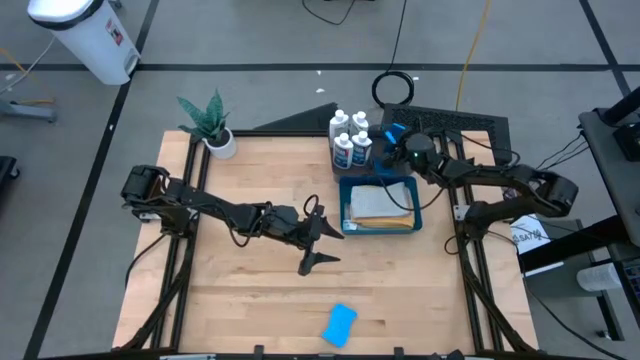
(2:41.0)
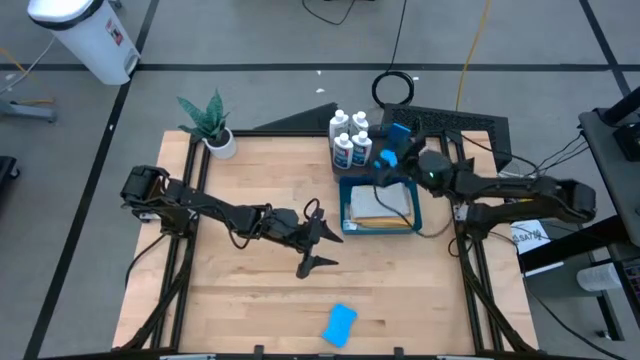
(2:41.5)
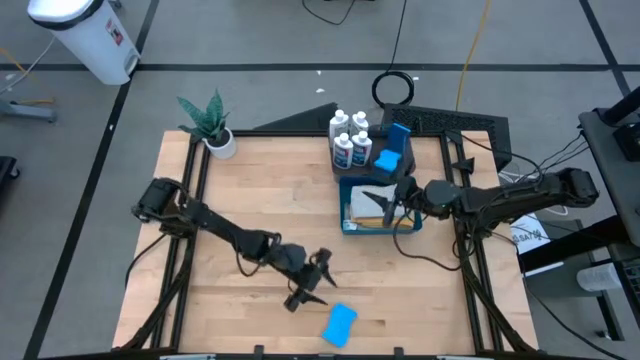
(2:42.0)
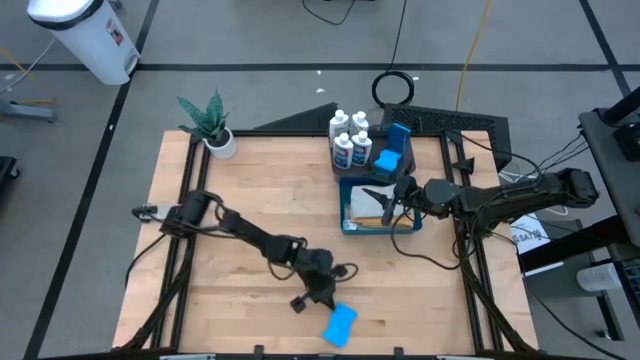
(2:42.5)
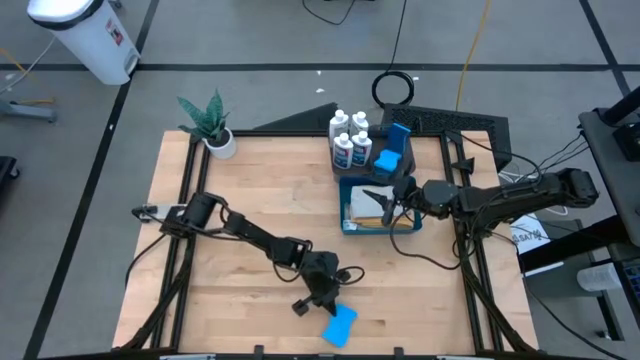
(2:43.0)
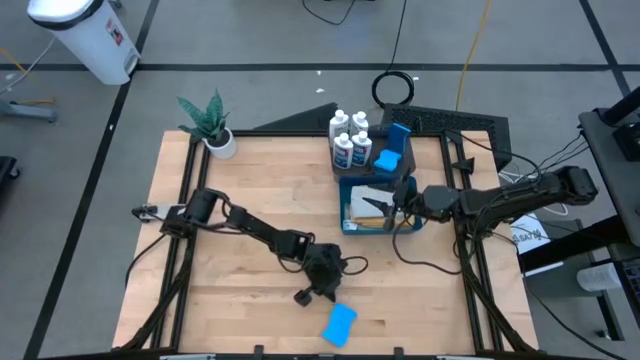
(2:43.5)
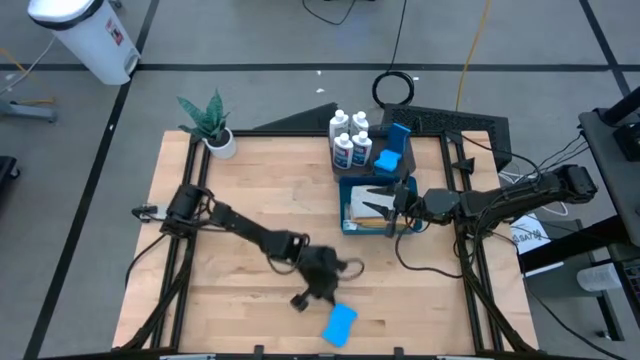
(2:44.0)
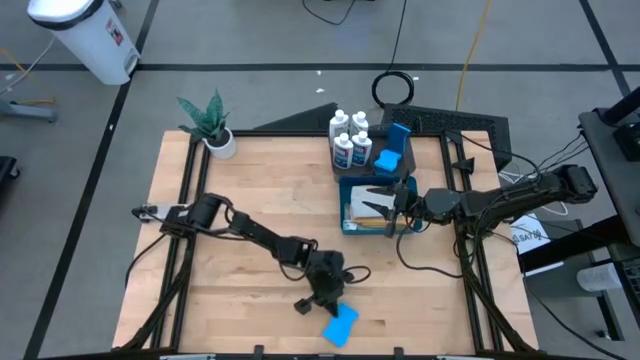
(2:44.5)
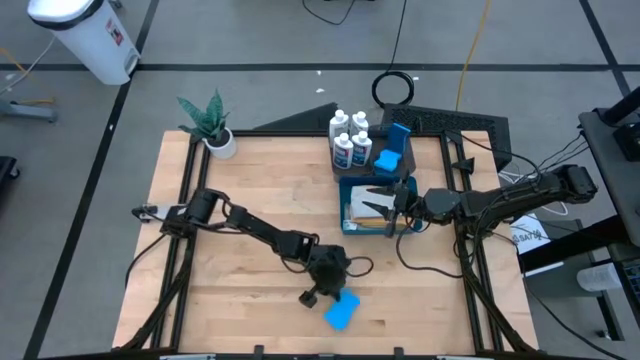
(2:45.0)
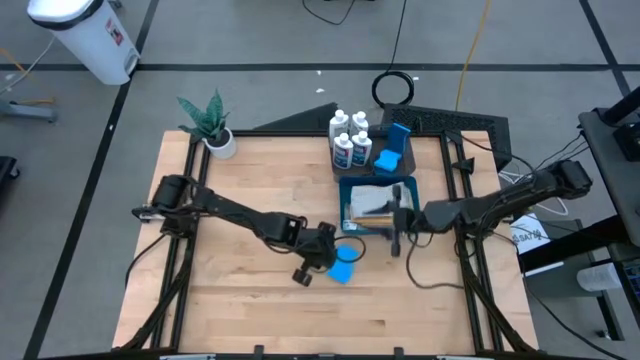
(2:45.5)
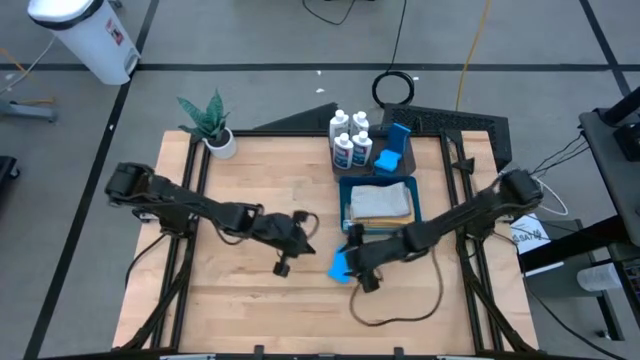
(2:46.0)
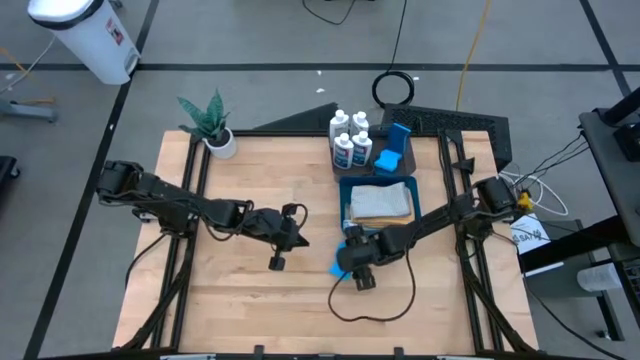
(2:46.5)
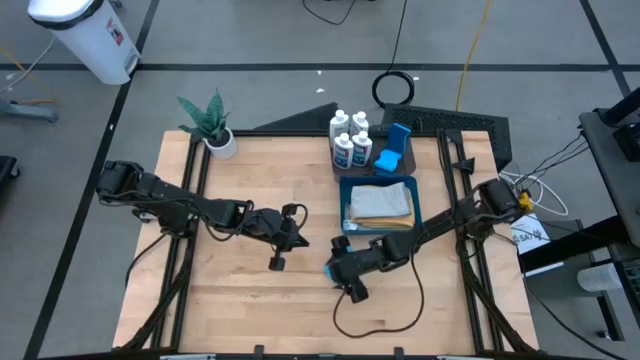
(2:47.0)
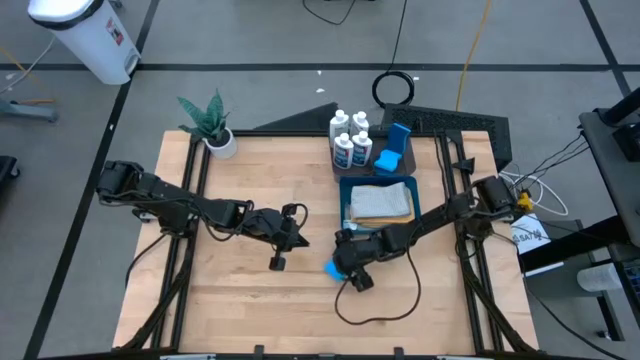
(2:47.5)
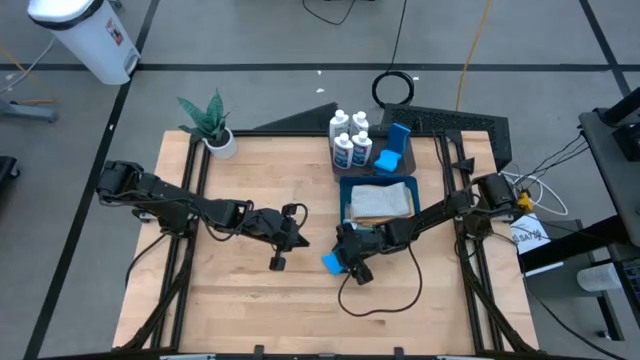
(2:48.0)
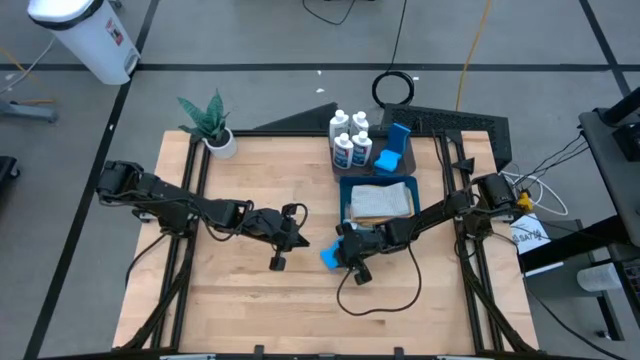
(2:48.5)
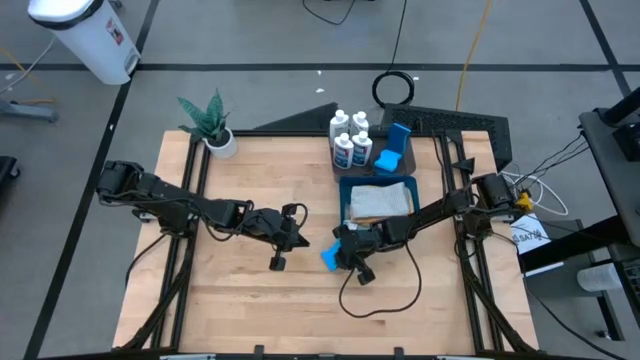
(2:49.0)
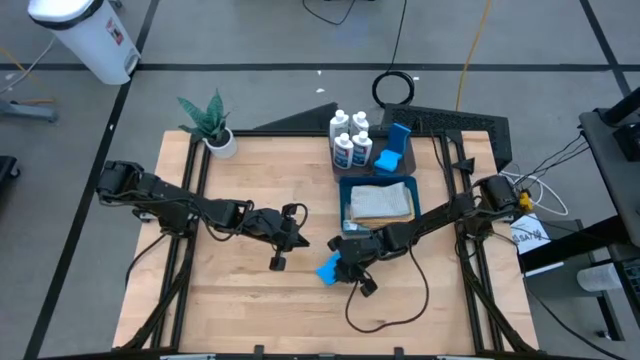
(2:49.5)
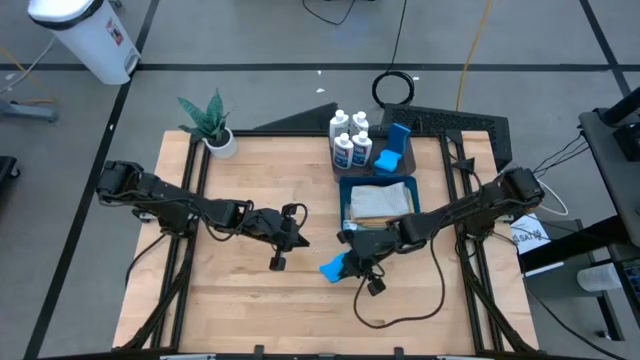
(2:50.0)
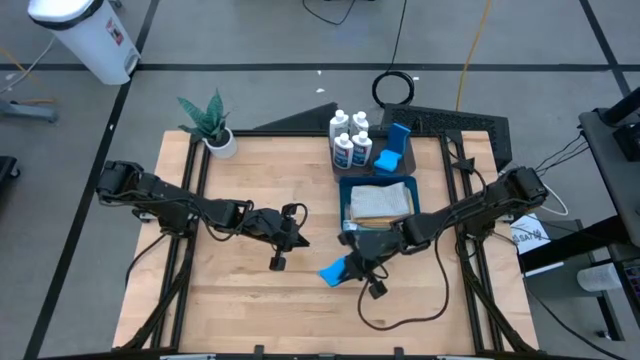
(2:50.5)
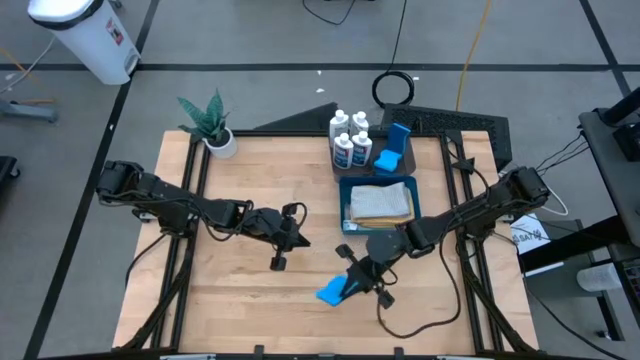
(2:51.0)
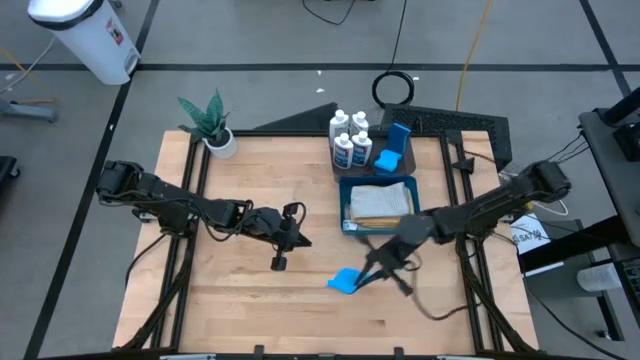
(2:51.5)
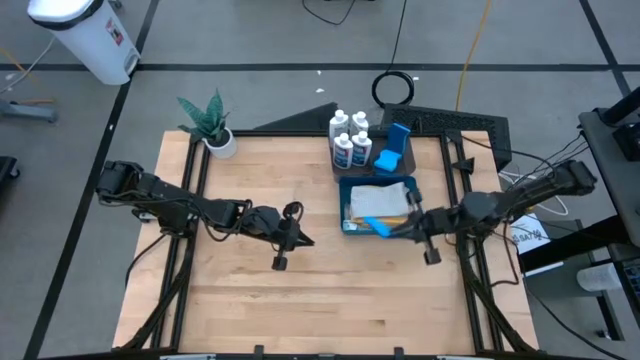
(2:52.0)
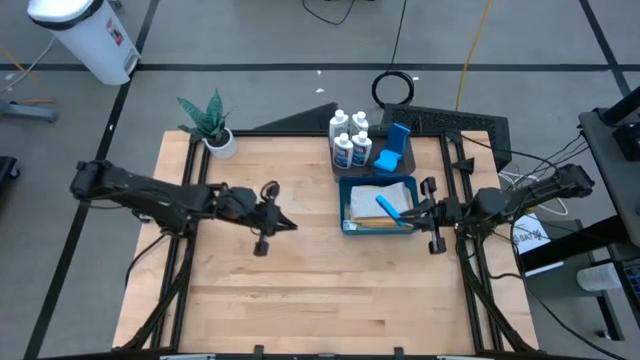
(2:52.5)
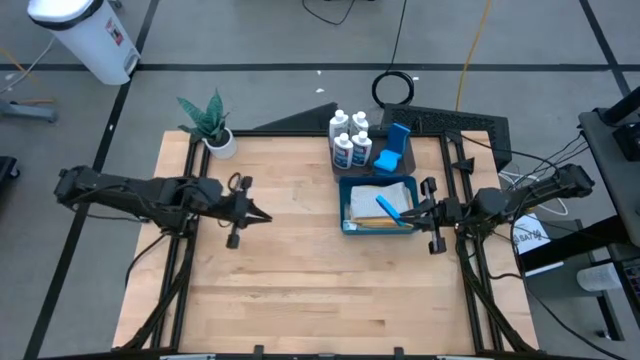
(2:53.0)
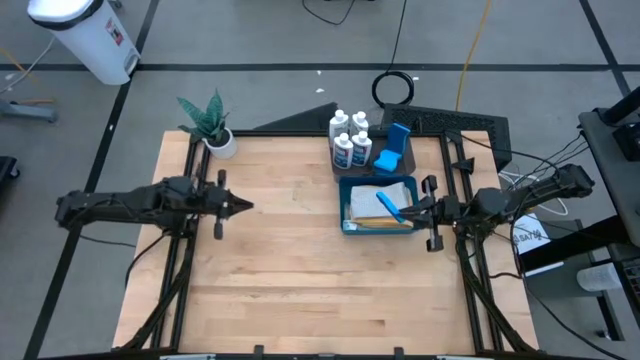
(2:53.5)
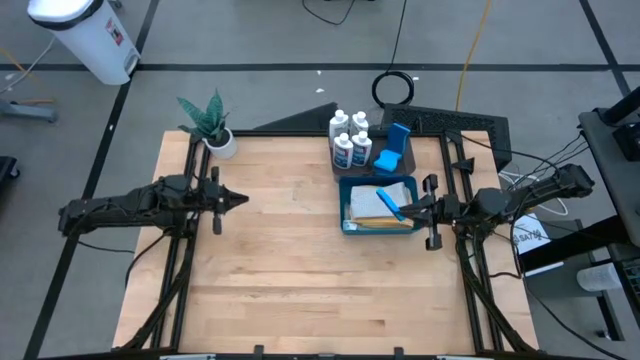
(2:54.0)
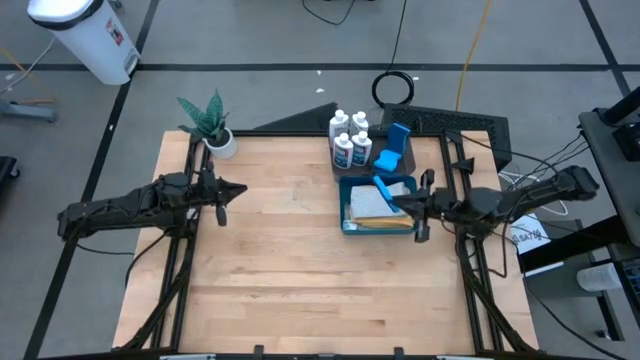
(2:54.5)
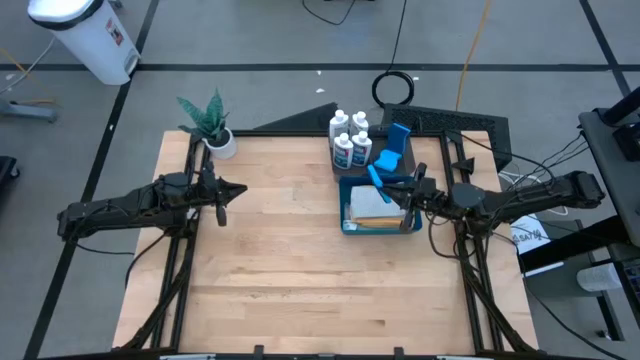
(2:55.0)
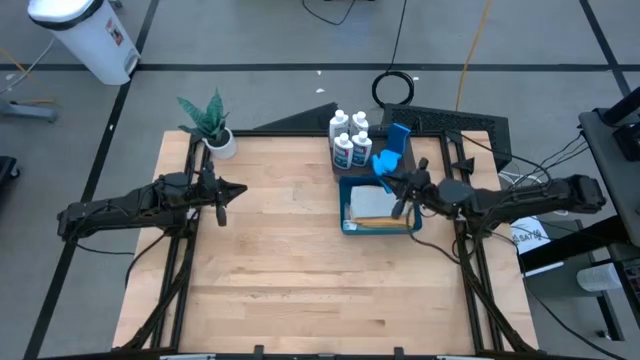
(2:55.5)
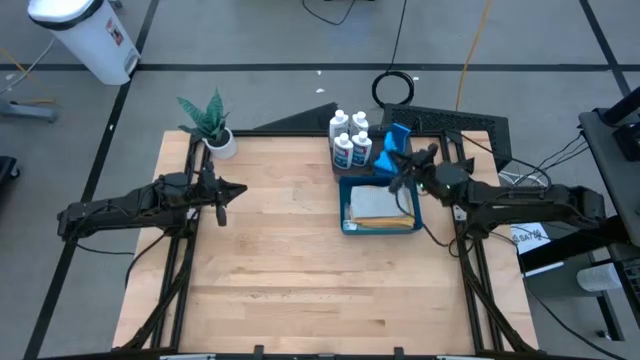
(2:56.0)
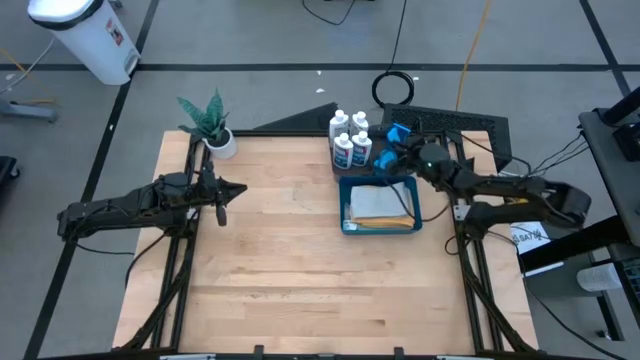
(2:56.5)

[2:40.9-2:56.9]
Task: Pick & Place Kitchen Items
Put the blue dishwashing sponge into the right black bin

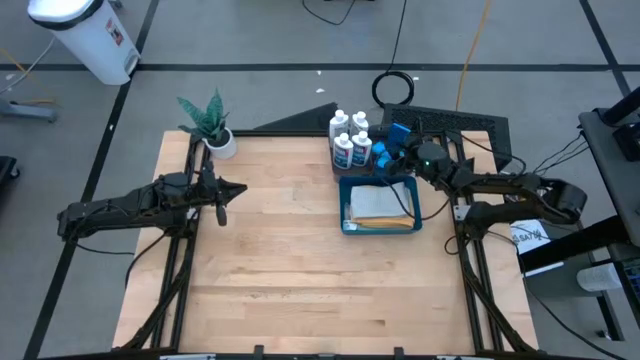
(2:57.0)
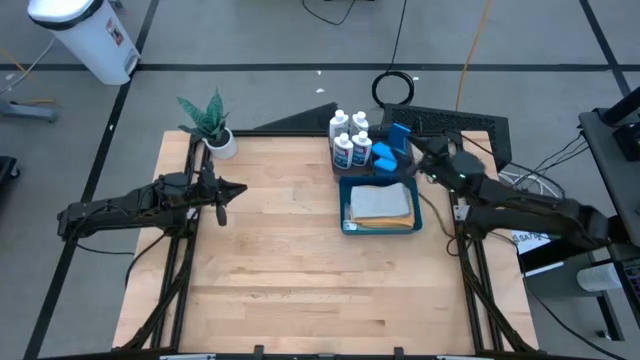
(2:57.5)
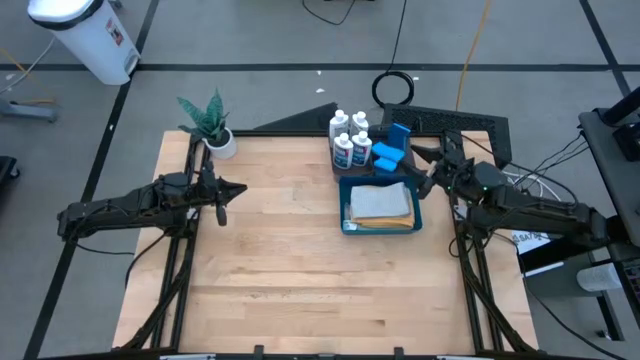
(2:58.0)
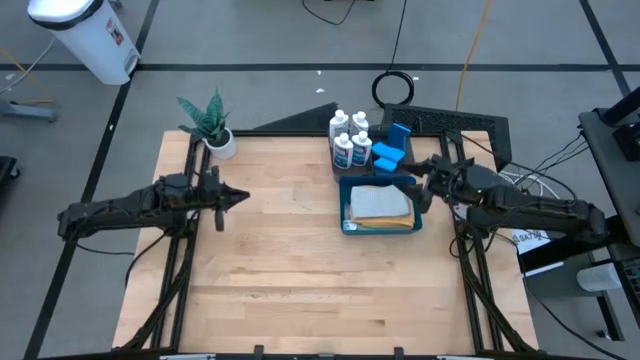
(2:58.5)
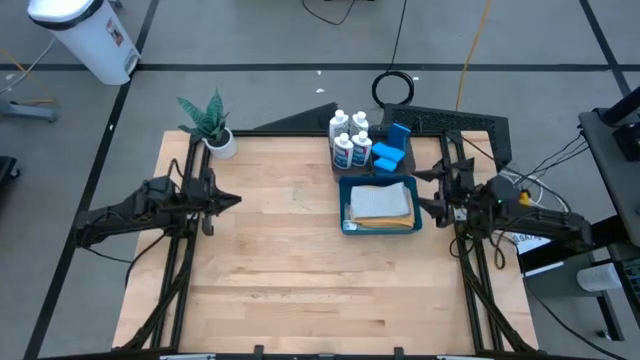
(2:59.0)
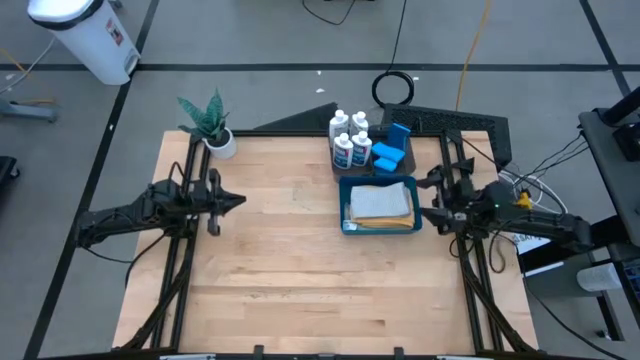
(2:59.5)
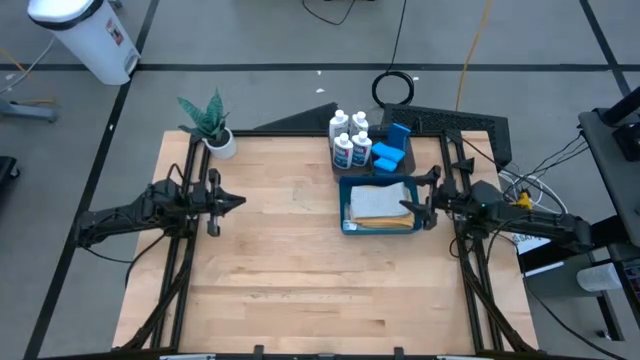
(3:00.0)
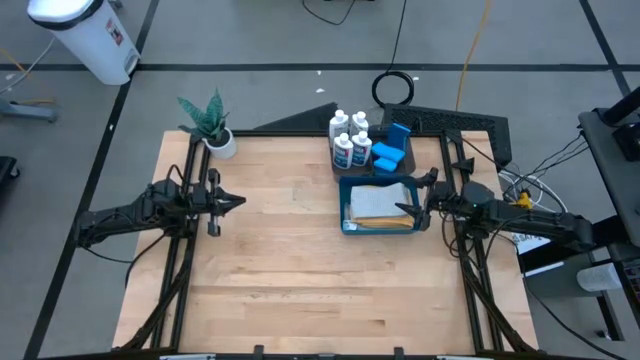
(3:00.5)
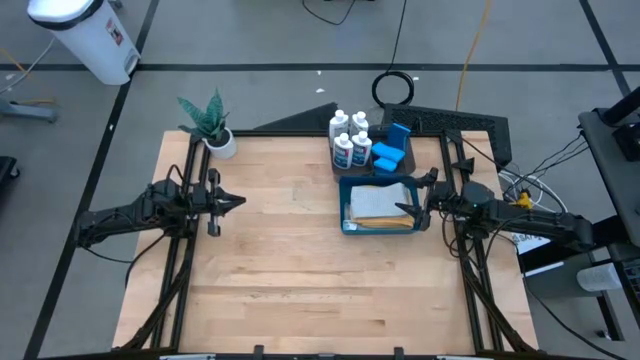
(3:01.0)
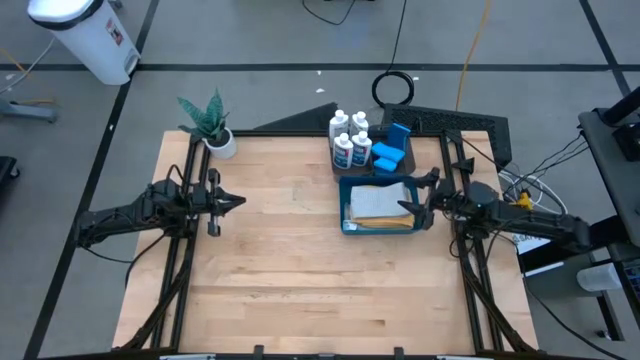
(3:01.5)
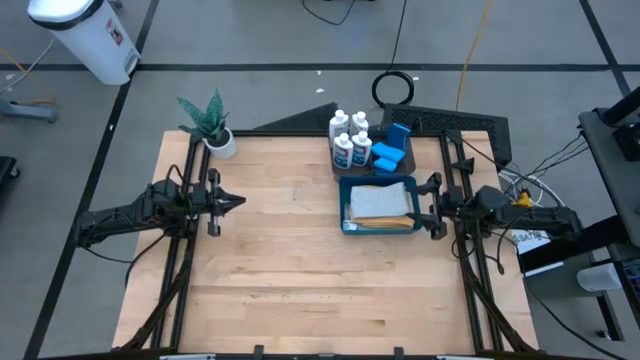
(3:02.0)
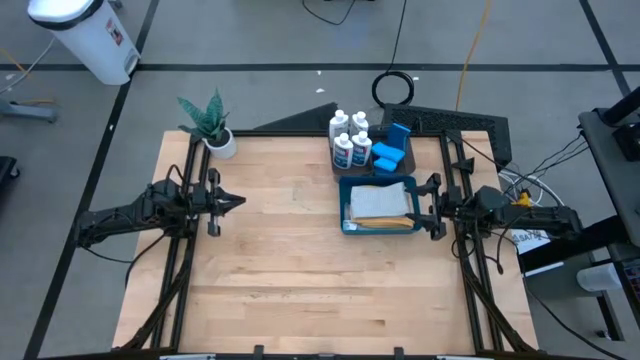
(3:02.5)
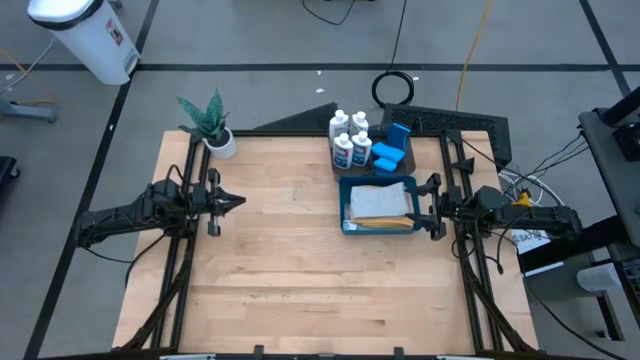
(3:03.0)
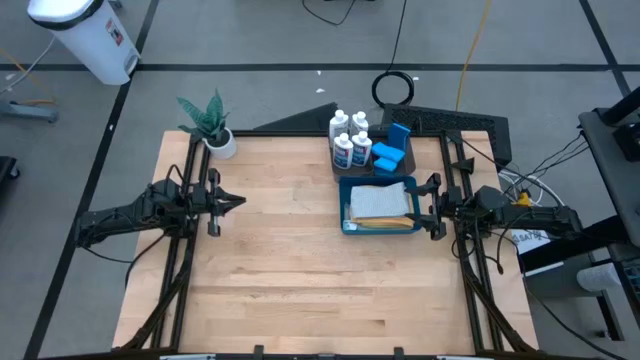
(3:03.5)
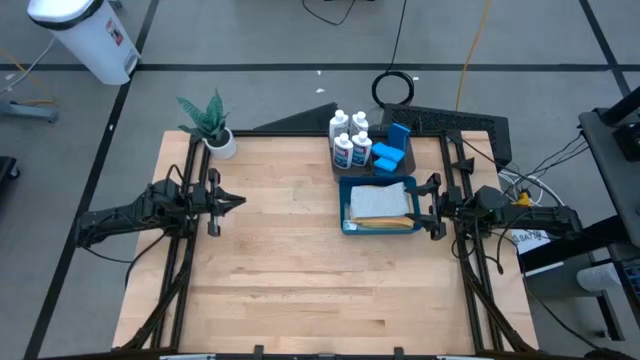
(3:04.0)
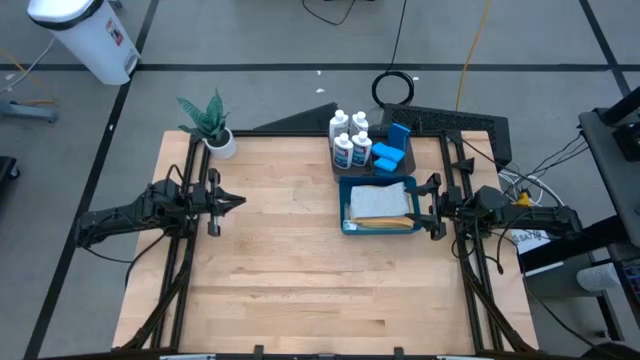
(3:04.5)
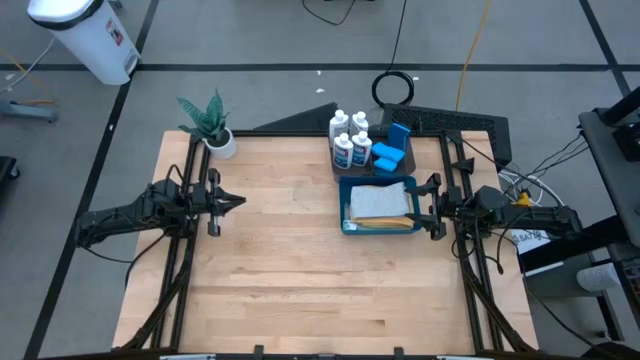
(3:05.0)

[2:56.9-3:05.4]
Return to Home Position
